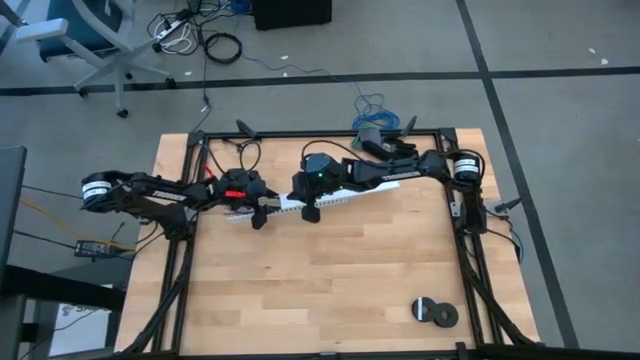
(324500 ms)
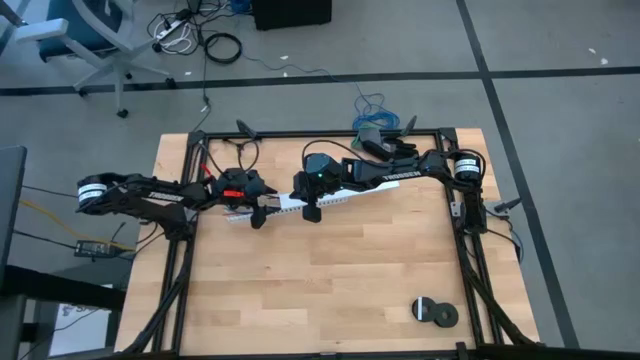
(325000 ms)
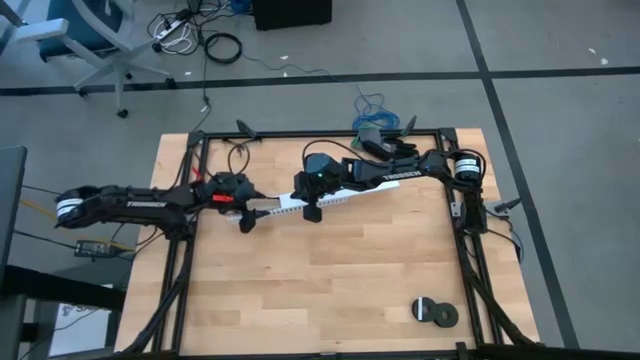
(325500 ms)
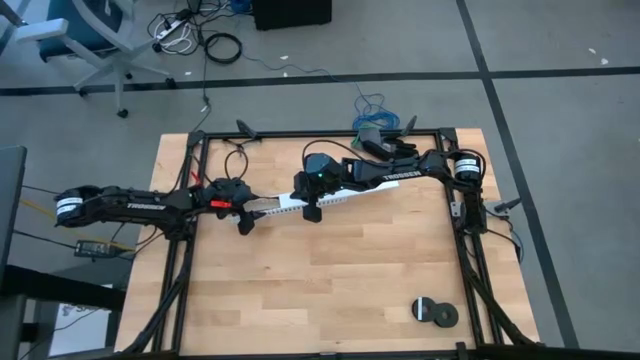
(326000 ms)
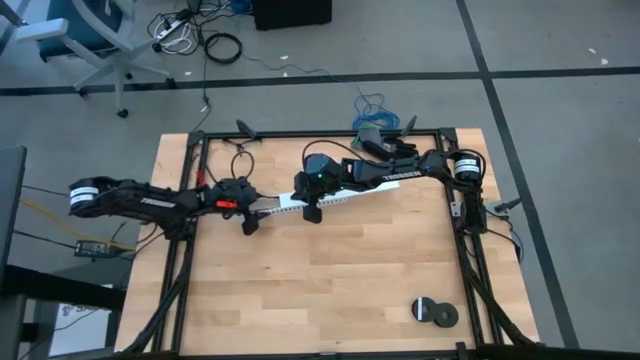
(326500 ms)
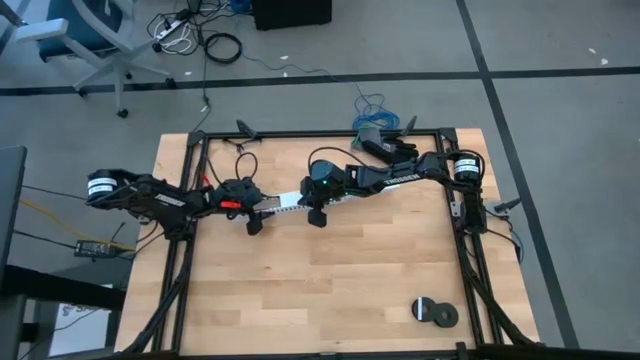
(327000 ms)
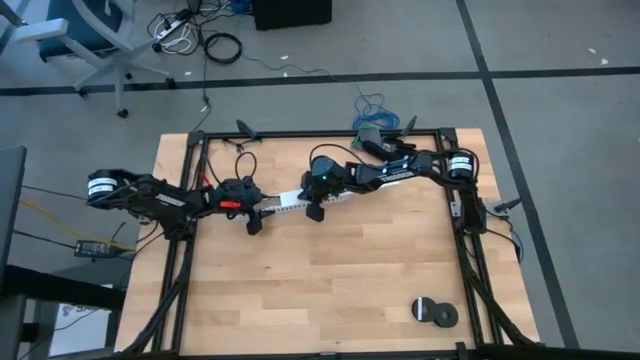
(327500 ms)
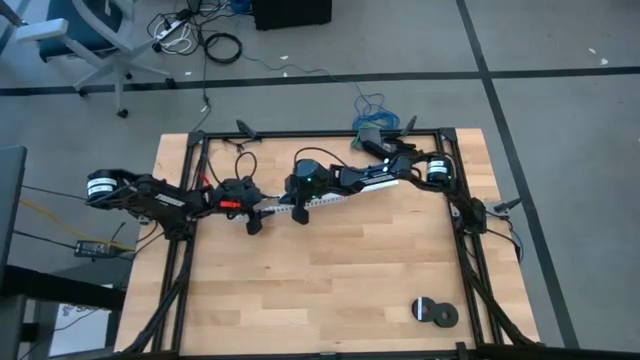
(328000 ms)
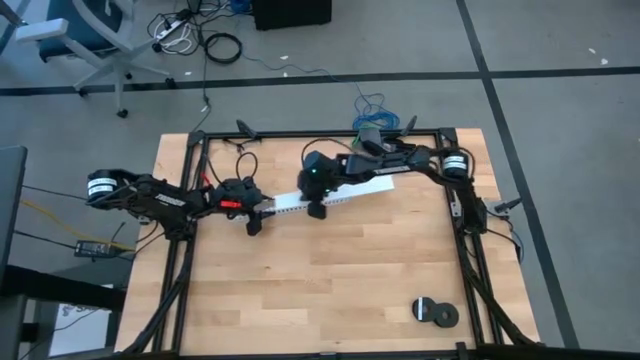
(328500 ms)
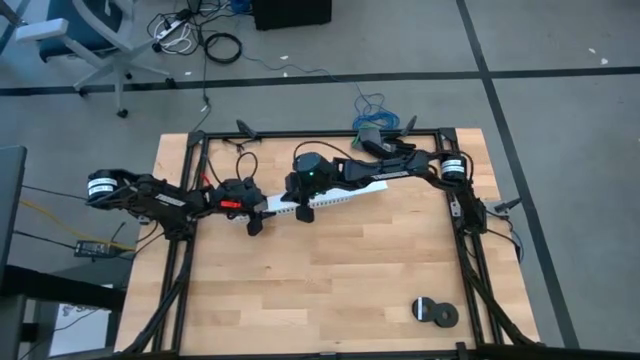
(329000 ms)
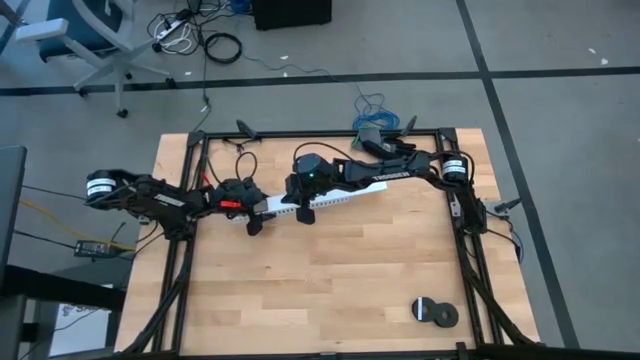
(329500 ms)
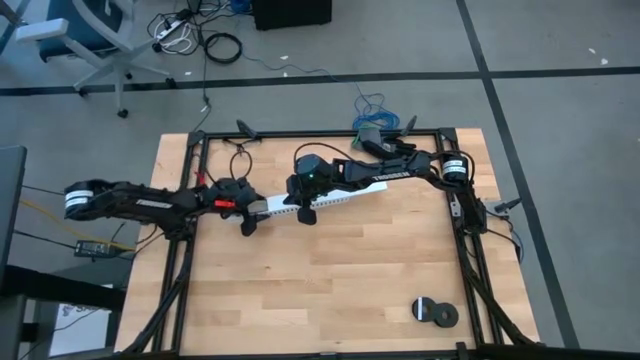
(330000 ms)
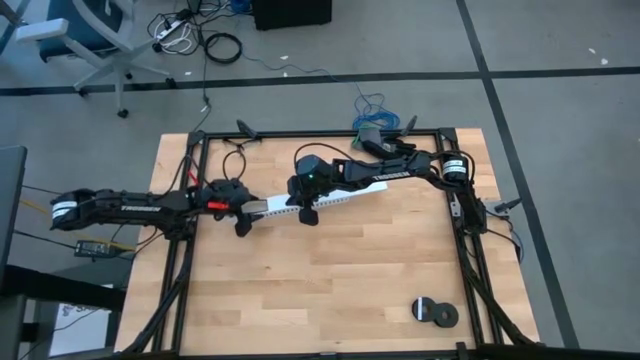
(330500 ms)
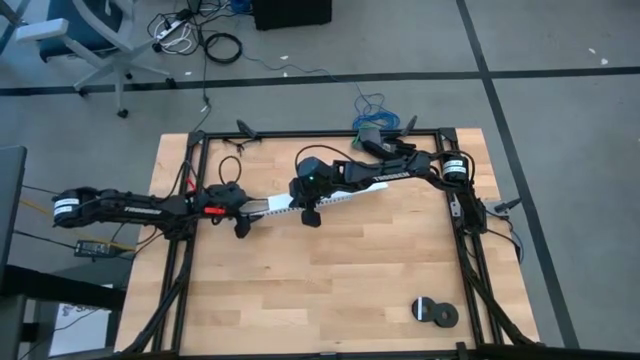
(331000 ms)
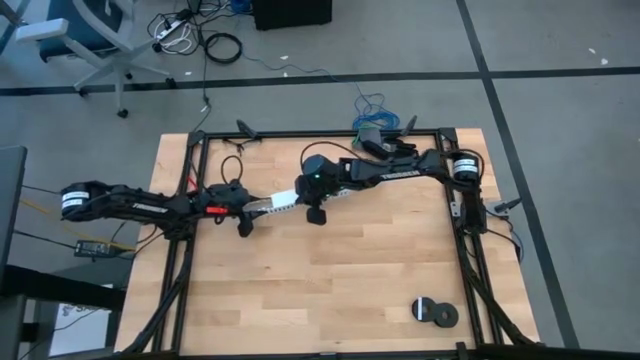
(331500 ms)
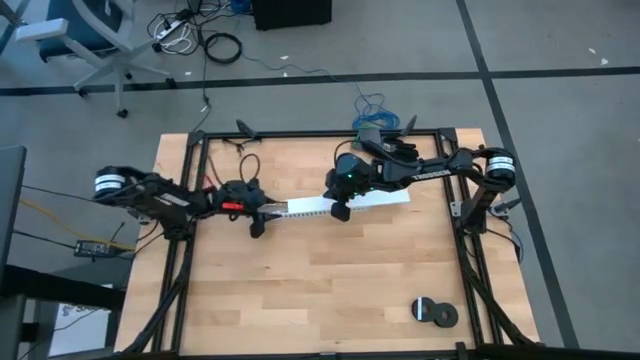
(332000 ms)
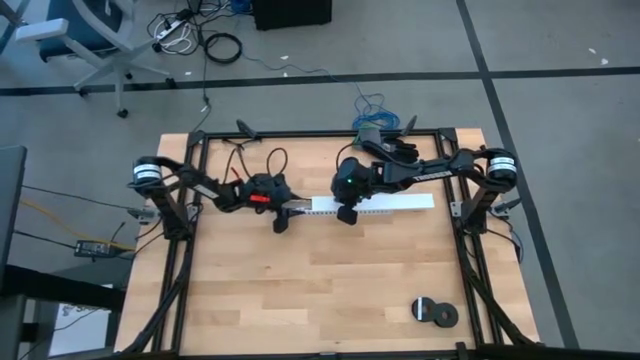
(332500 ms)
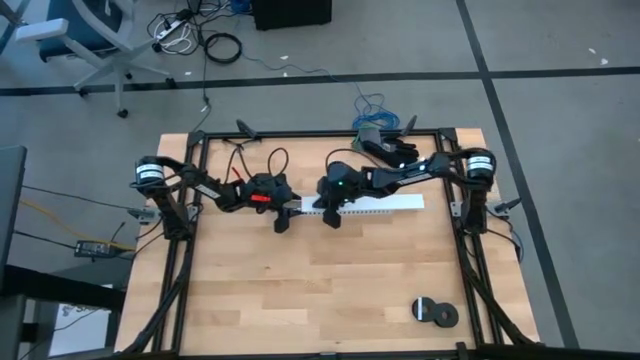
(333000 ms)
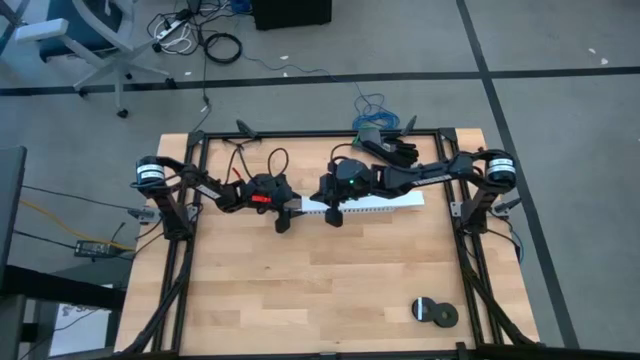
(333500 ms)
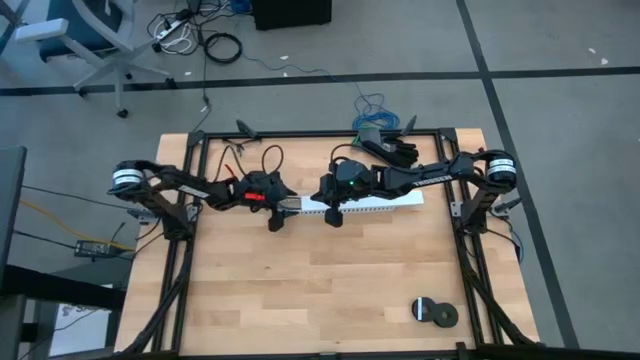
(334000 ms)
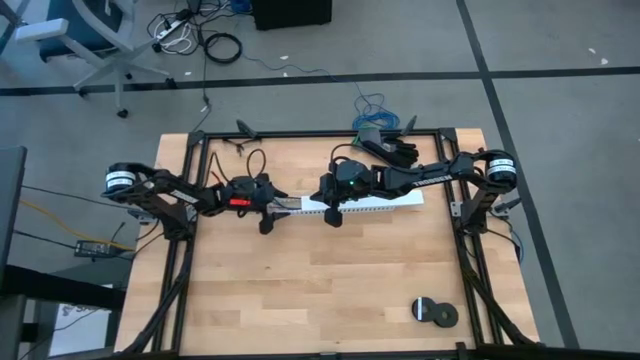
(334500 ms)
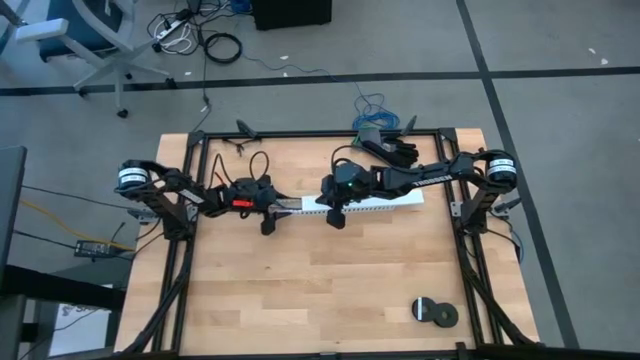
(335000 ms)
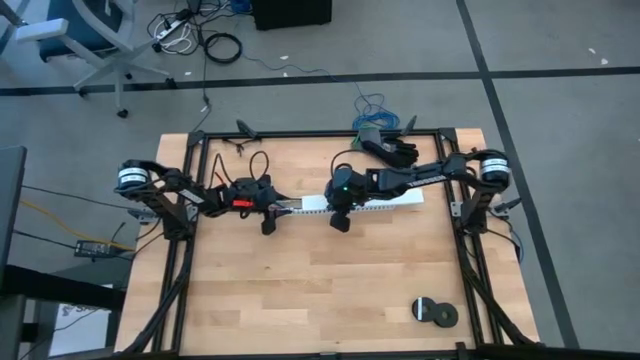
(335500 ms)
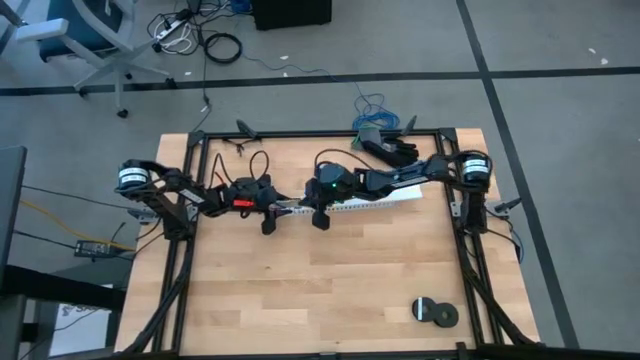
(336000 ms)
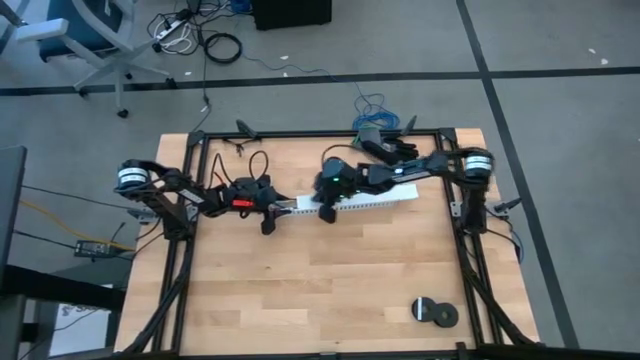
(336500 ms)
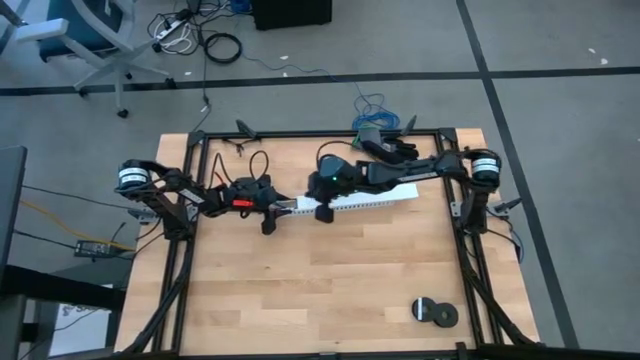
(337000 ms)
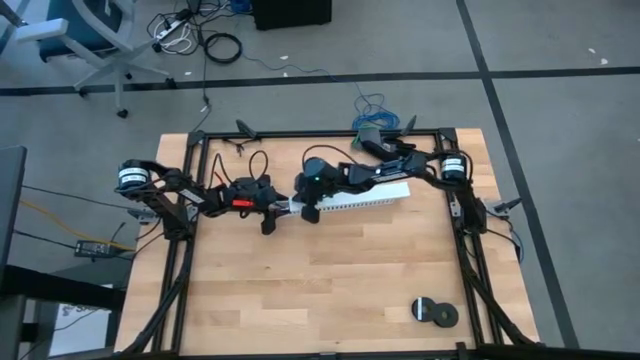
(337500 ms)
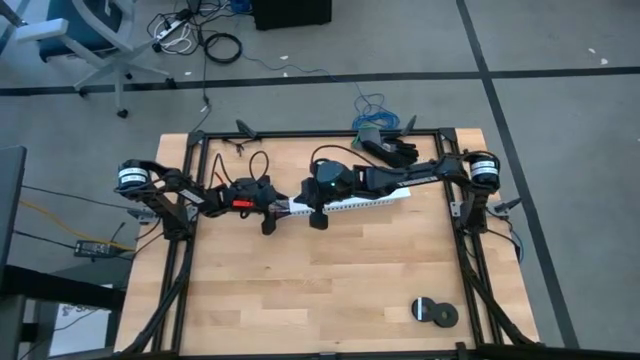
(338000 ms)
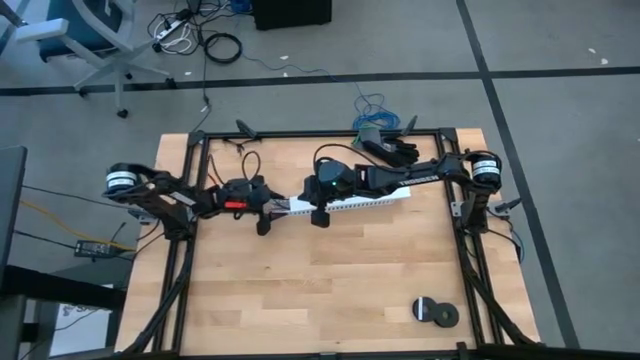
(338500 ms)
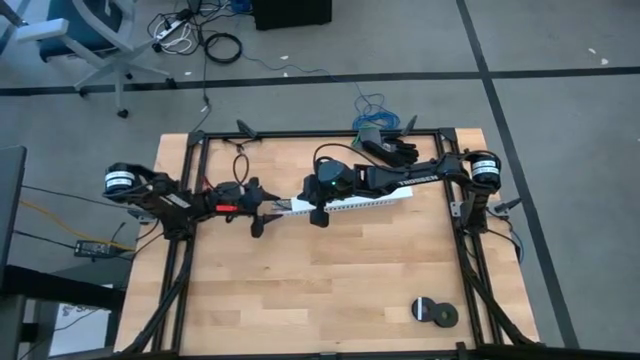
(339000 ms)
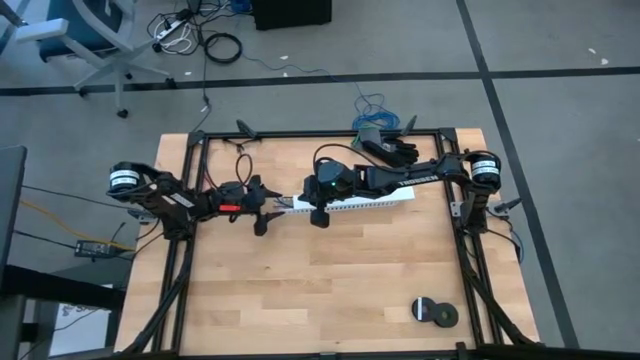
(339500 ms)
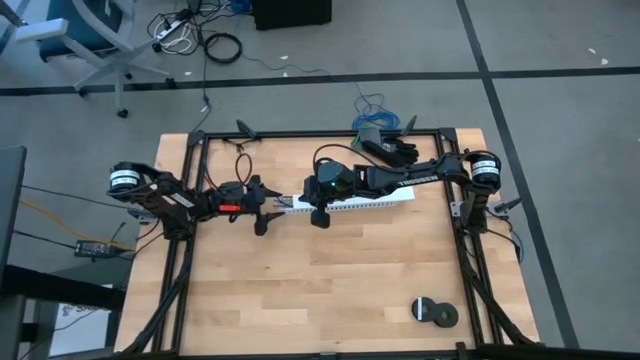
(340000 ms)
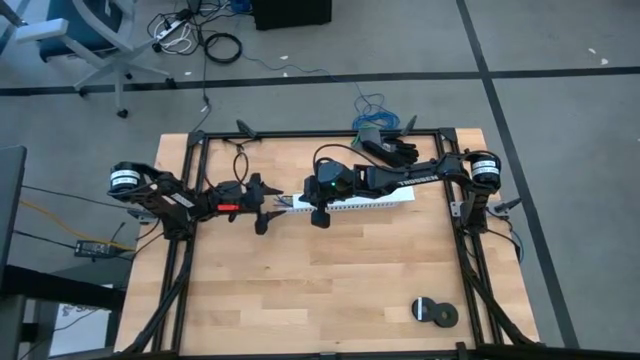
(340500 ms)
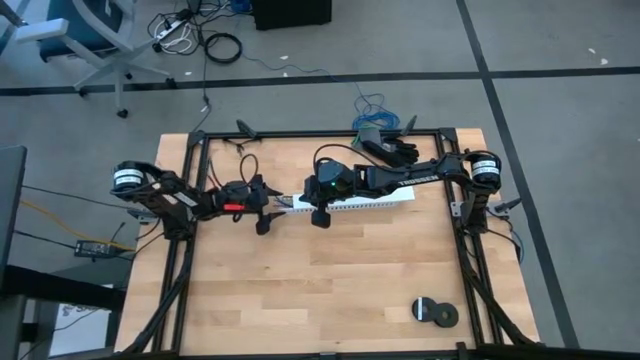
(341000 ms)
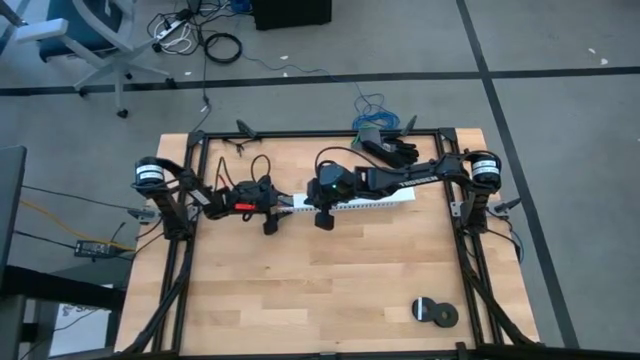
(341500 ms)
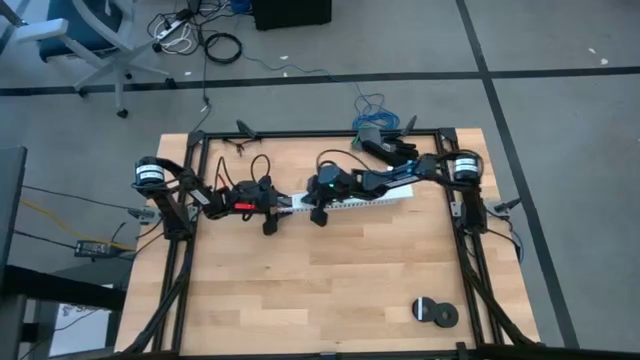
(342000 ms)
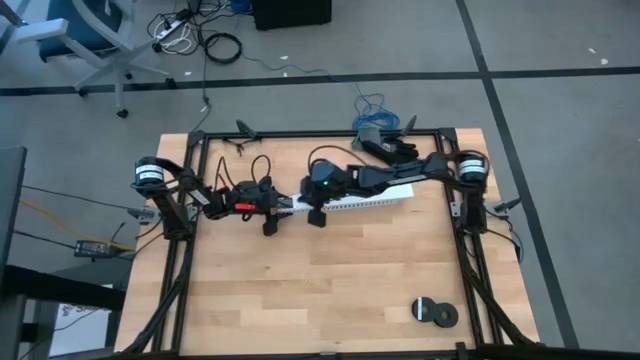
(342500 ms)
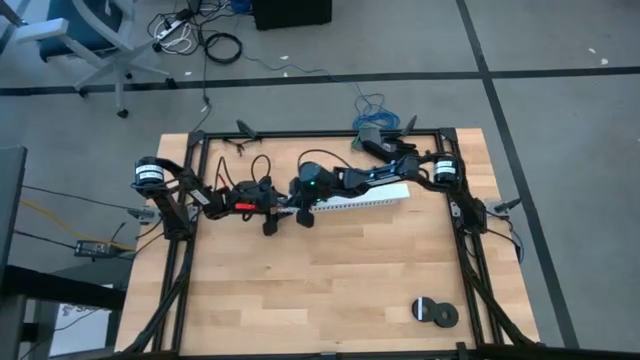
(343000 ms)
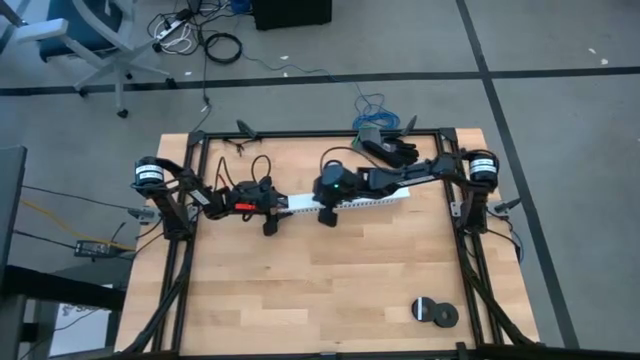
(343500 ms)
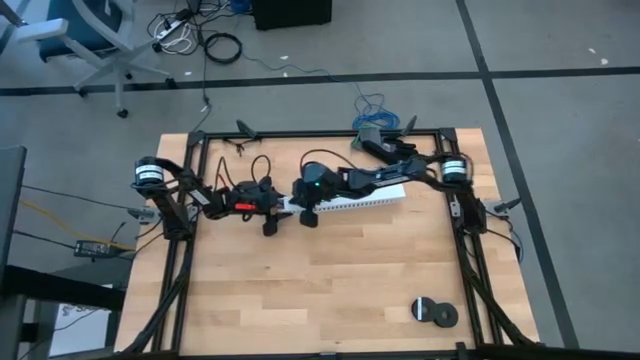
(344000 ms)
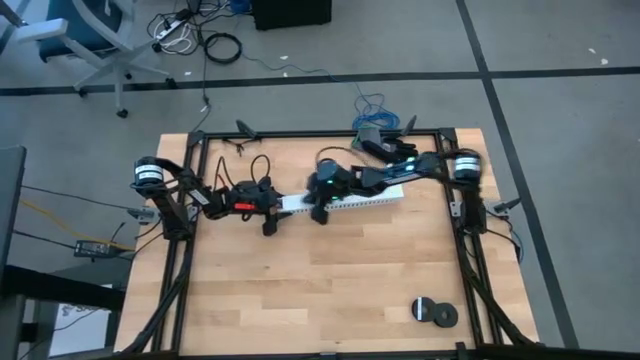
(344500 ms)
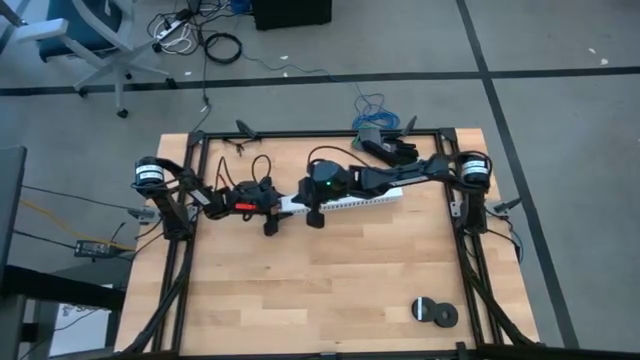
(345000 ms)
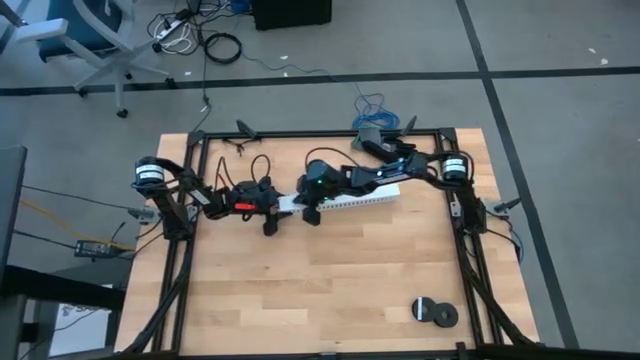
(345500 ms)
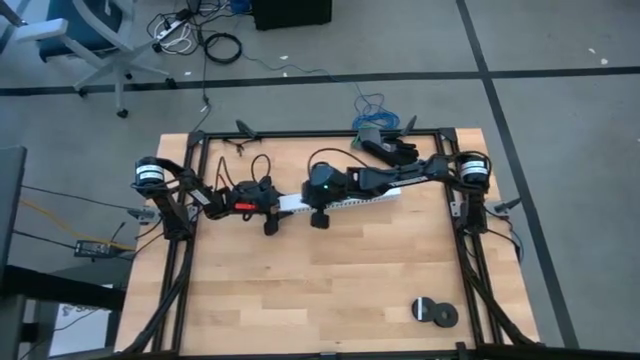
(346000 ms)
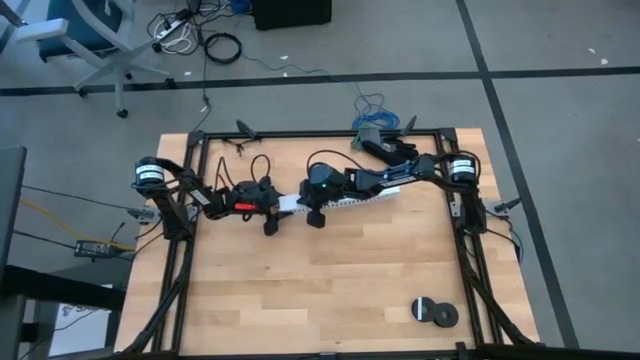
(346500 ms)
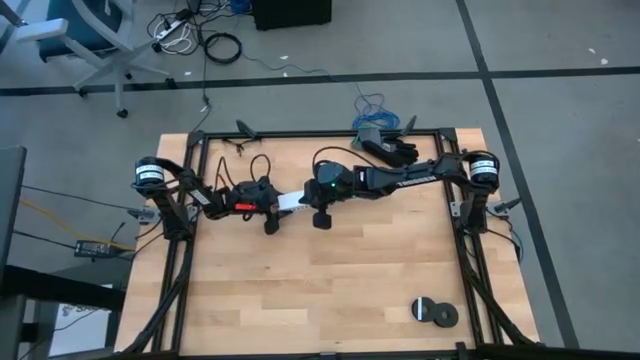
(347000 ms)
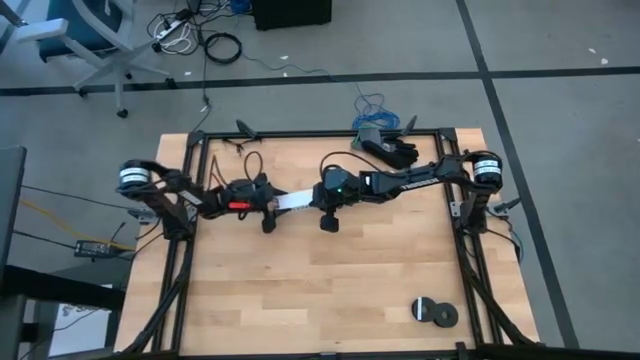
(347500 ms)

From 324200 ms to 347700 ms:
Task: Ziptie cables
Close the white cable duct lid
